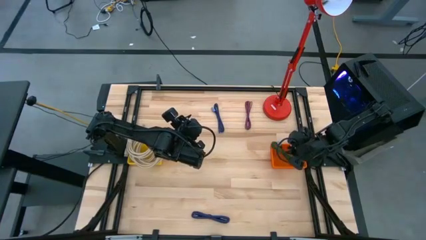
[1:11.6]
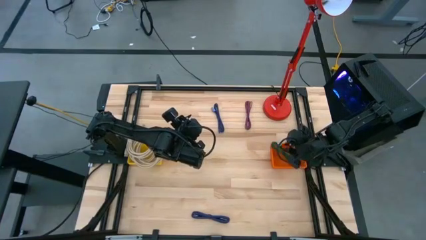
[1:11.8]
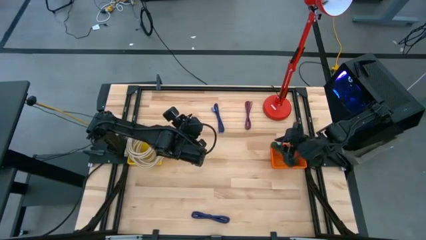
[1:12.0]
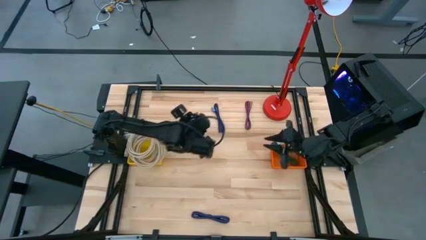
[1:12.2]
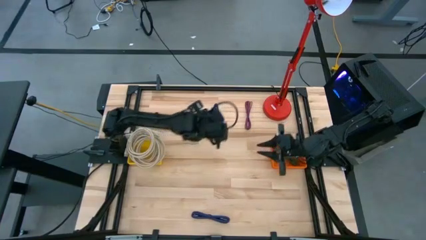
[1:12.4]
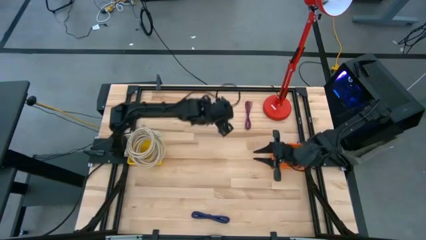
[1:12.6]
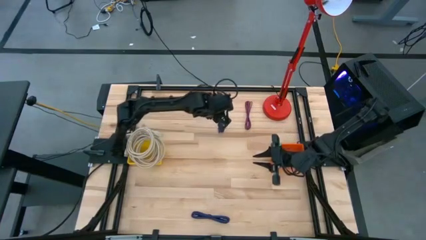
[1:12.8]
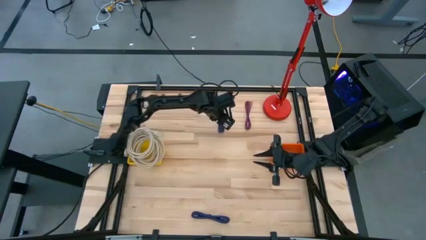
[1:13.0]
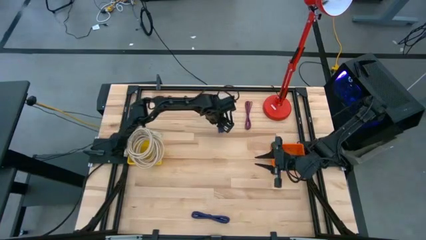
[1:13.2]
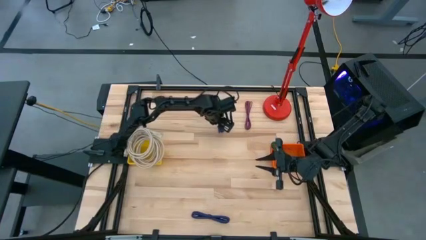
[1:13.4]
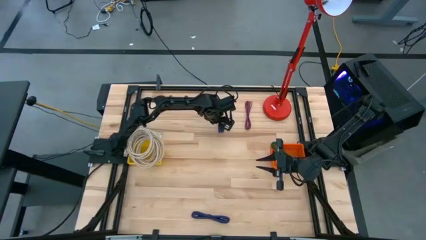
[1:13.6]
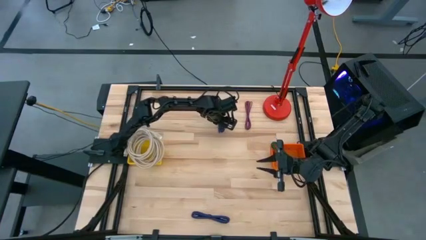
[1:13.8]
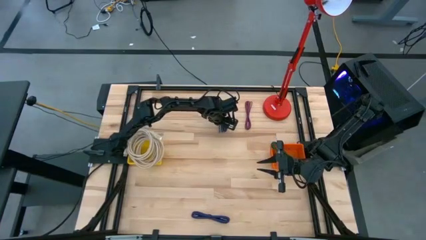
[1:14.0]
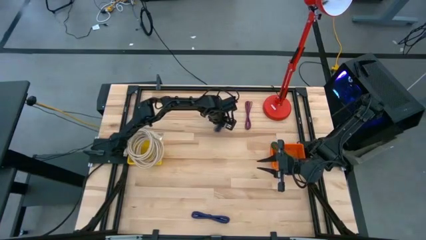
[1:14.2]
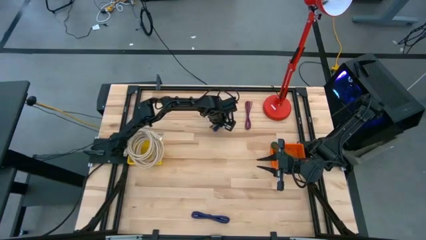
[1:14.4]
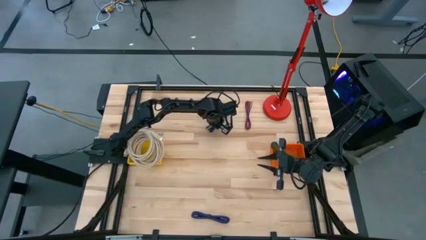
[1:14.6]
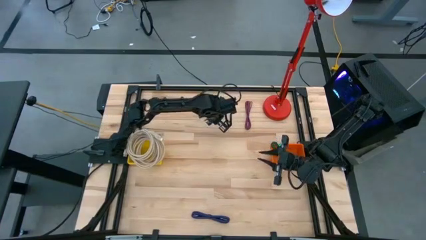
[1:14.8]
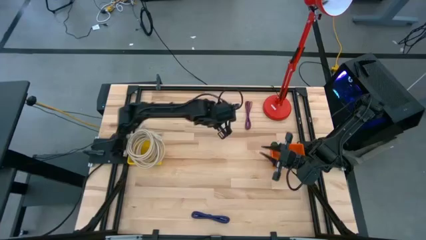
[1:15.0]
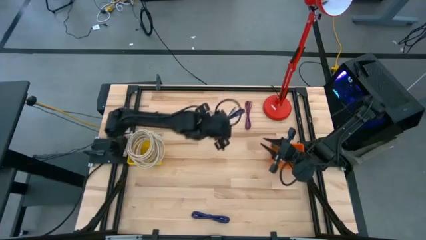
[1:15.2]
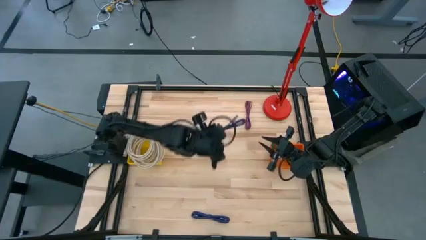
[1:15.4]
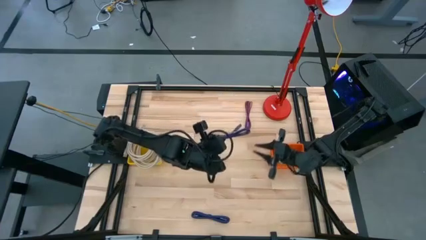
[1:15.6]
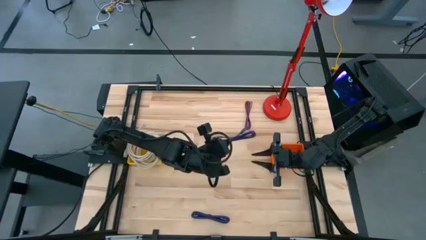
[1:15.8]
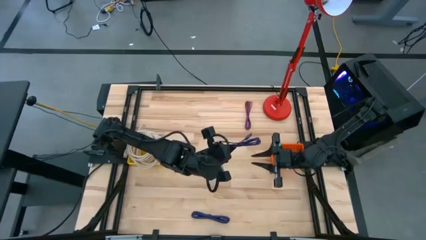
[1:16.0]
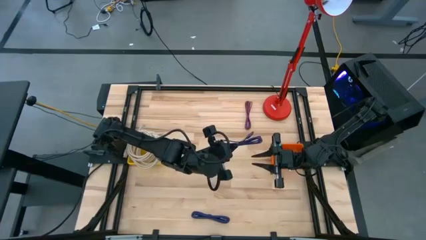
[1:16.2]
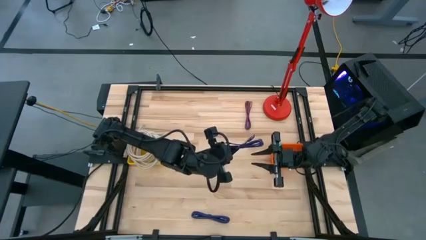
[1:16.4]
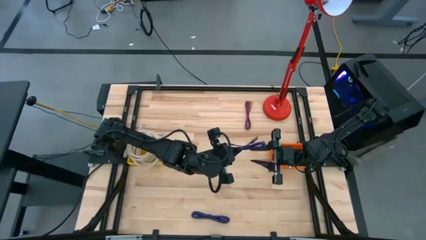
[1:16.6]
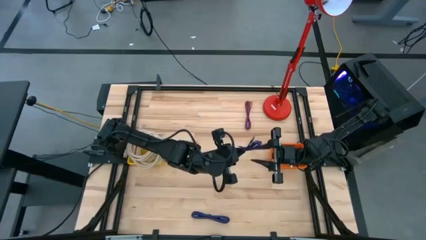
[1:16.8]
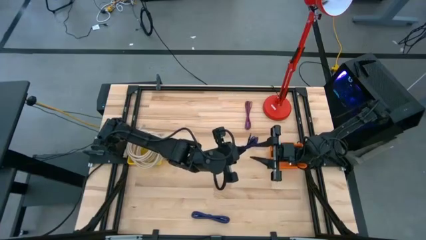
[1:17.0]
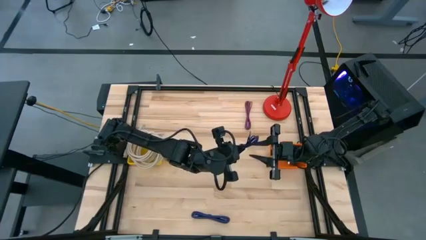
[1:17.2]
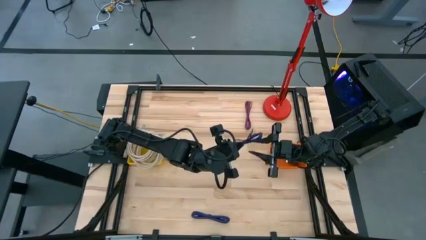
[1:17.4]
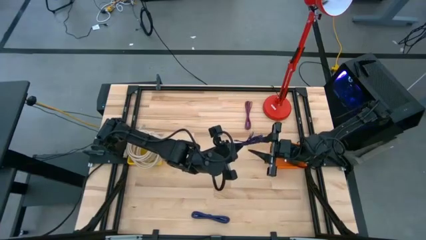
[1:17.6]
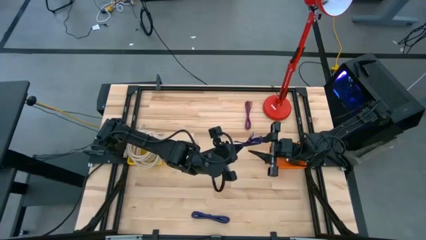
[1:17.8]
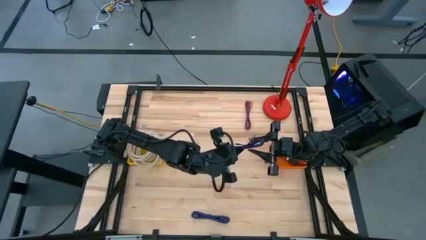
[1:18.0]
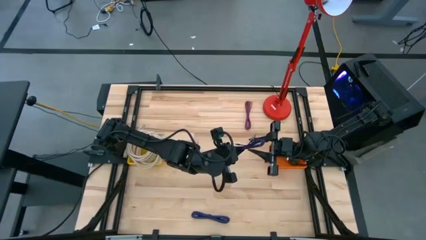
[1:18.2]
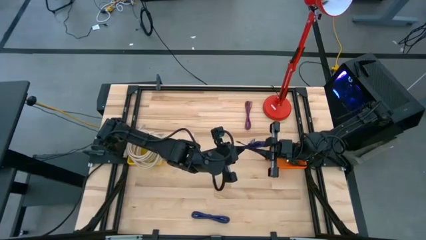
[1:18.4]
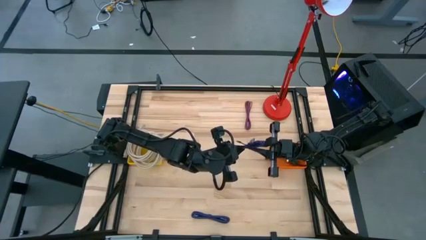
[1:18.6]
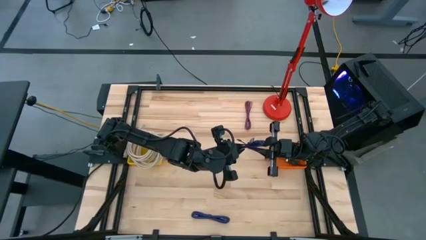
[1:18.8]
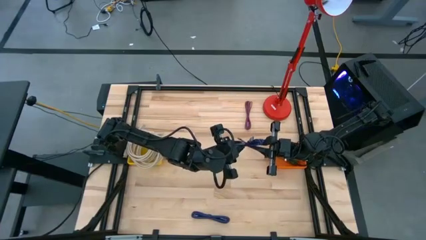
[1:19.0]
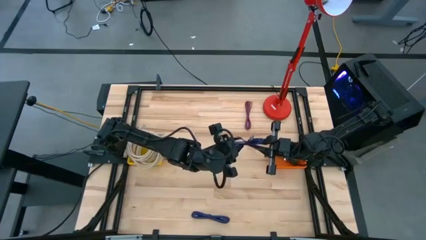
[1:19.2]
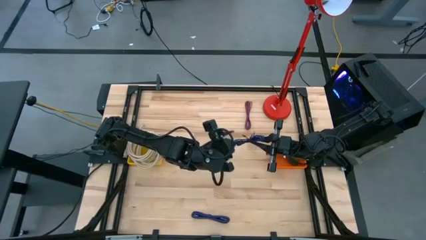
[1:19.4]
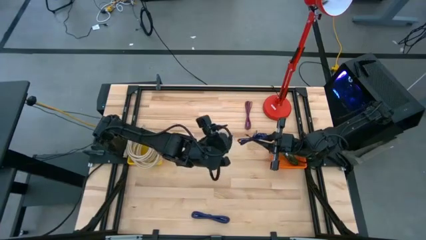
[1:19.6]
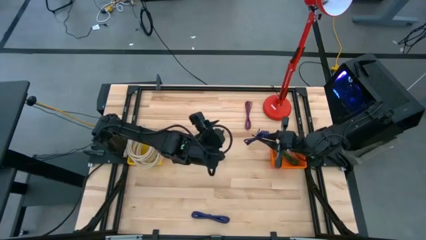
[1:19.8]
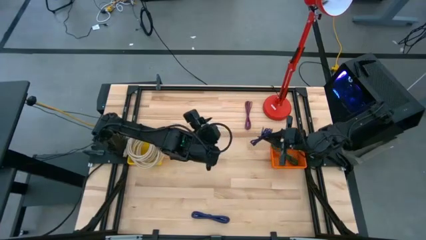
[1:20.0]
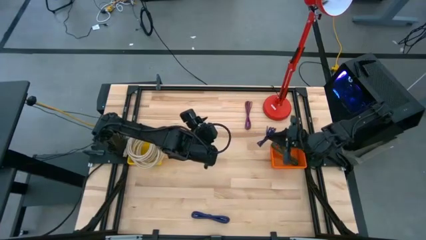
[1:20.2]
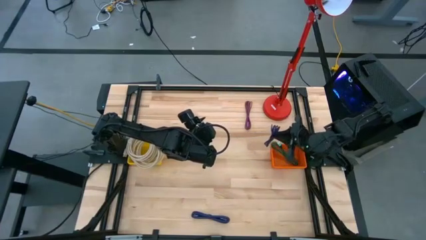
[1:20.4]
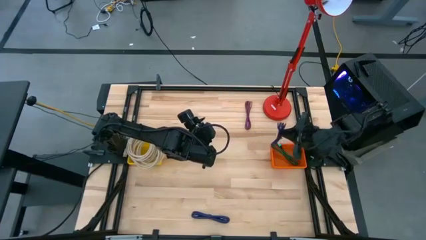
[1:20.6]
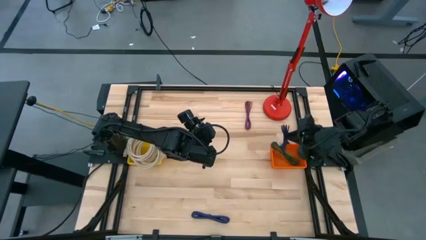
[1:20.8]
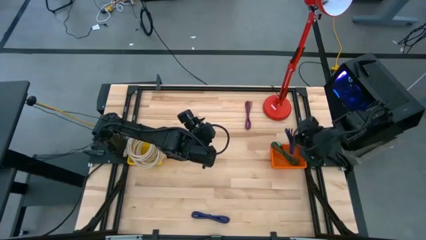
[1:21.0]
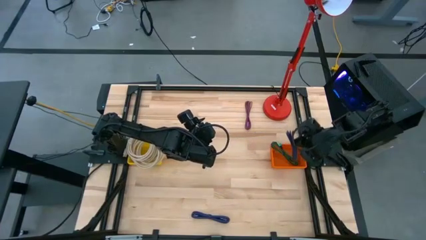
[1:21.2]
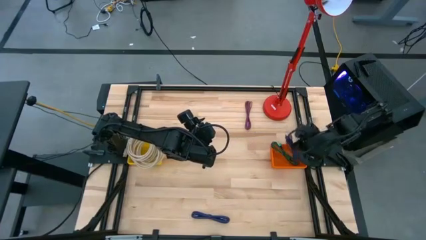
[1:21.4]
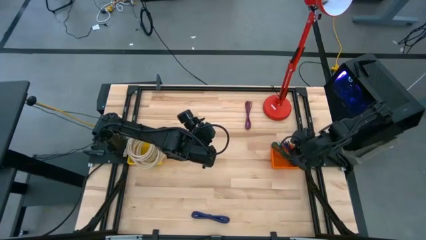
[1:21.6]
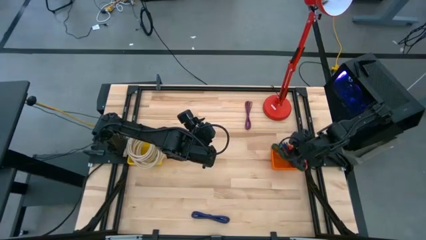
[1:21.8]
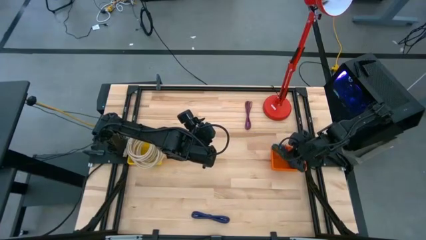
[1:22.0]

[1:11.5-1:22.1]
Task: Pick & Place USB Port
Put the blue charger cable into the orange basket
